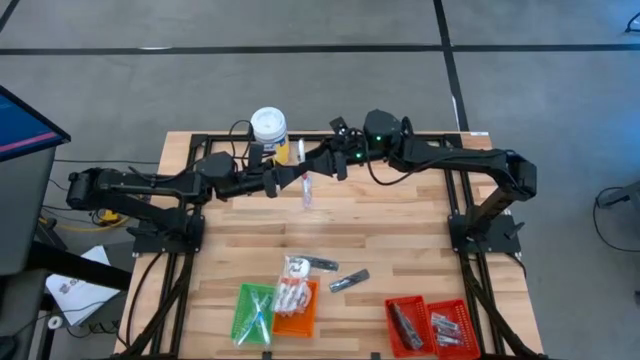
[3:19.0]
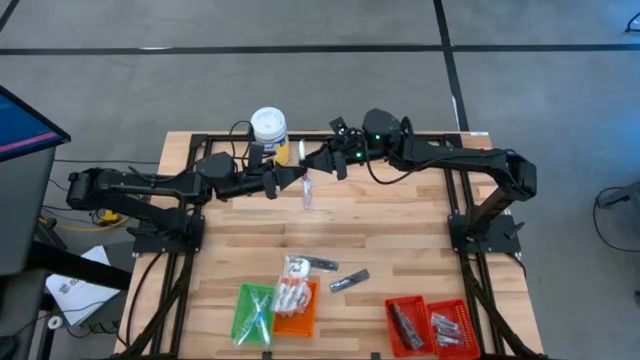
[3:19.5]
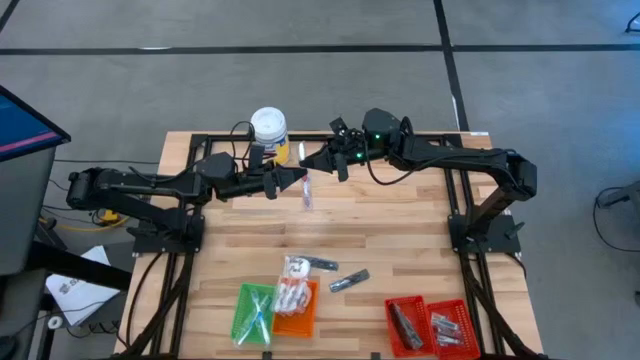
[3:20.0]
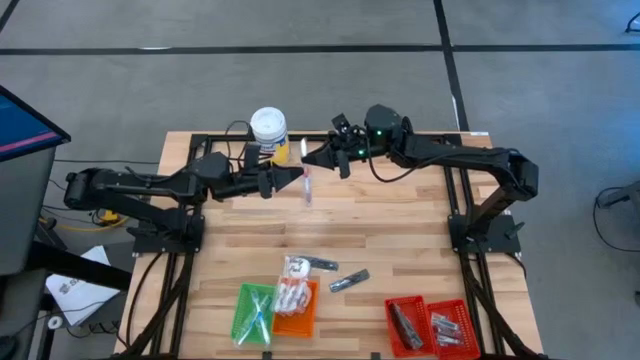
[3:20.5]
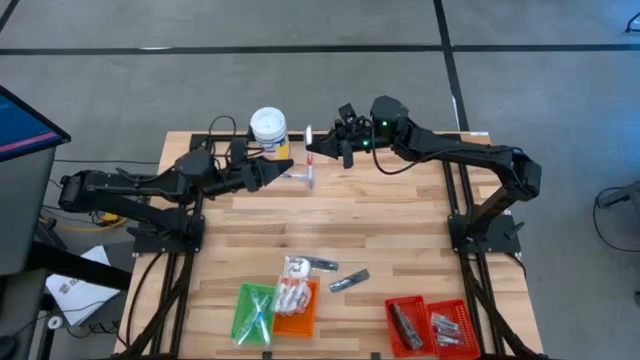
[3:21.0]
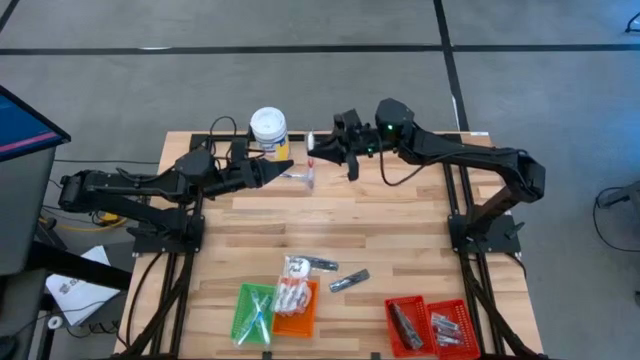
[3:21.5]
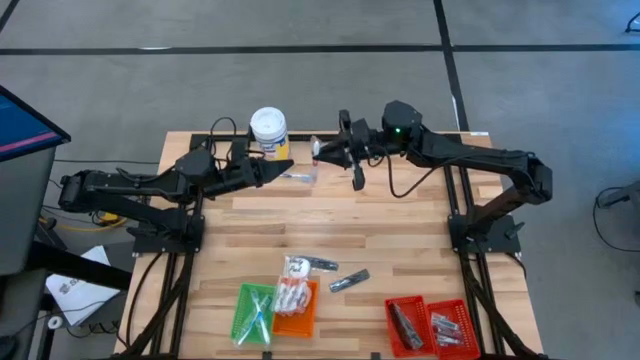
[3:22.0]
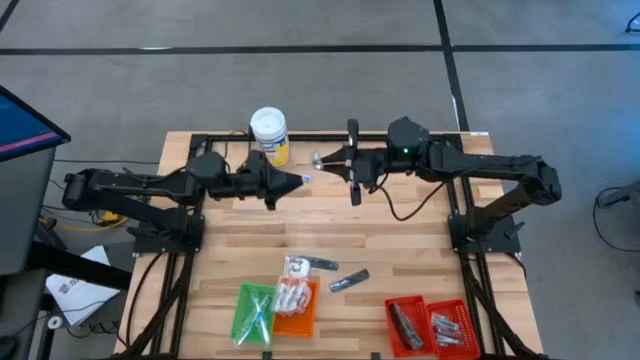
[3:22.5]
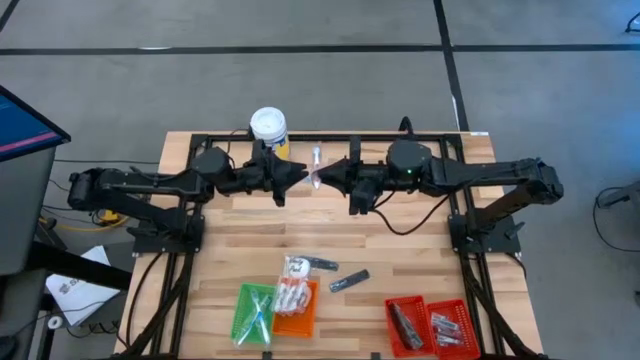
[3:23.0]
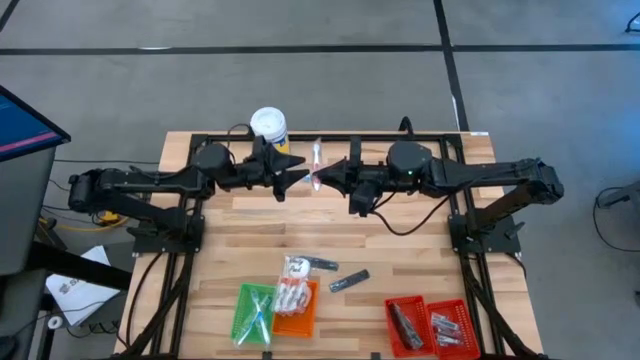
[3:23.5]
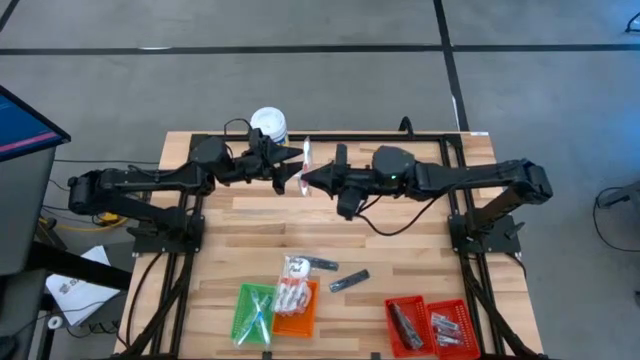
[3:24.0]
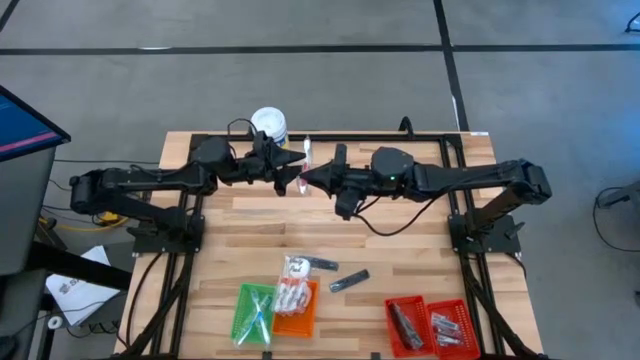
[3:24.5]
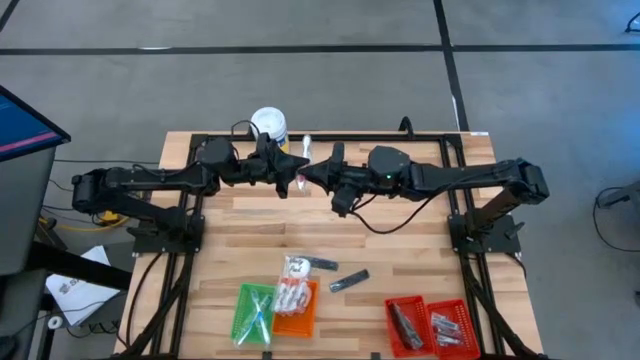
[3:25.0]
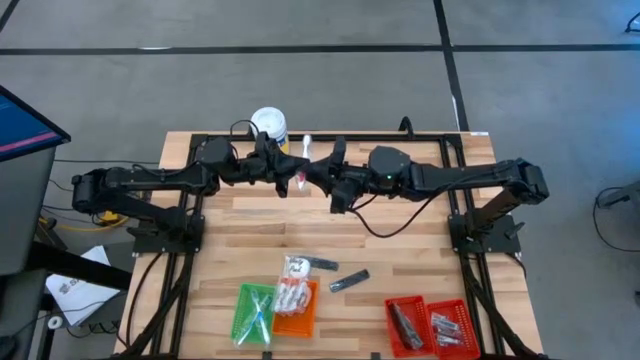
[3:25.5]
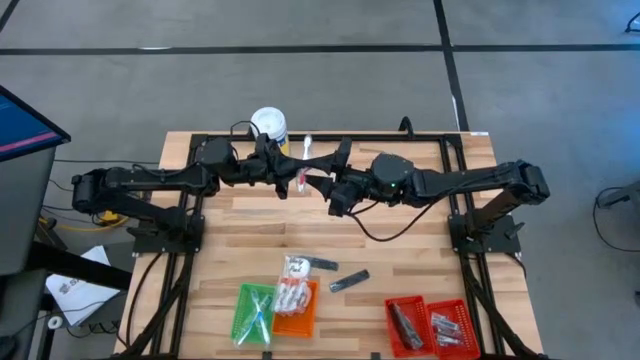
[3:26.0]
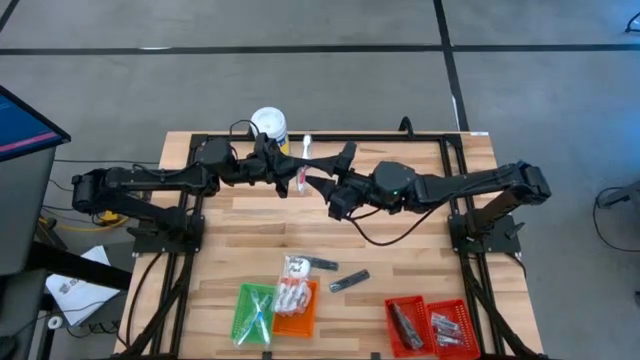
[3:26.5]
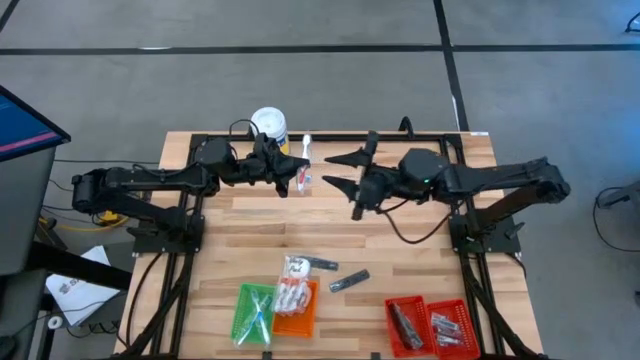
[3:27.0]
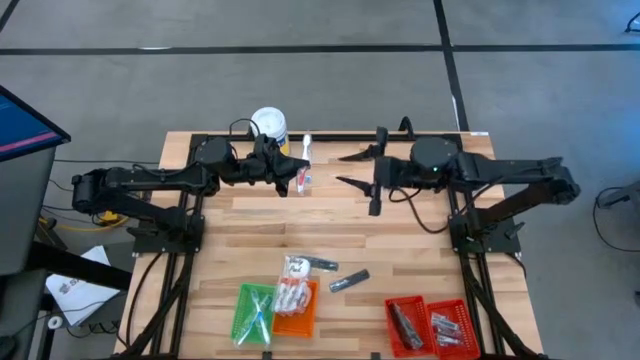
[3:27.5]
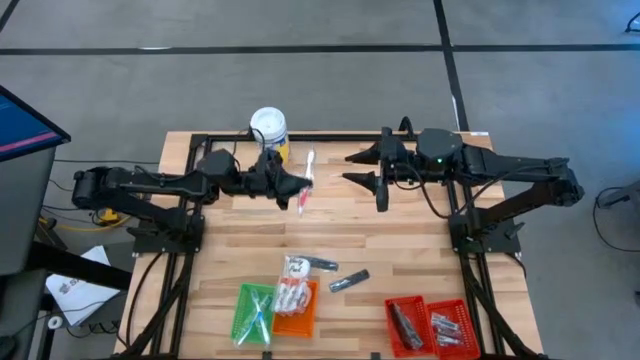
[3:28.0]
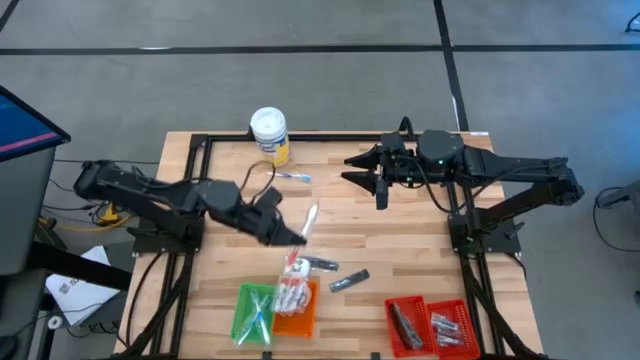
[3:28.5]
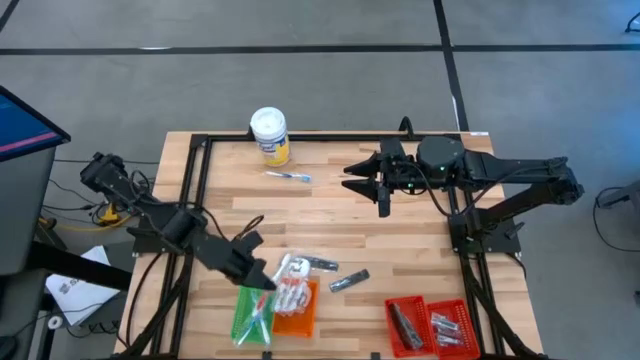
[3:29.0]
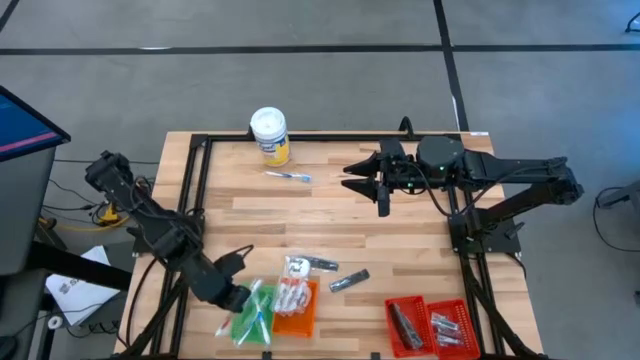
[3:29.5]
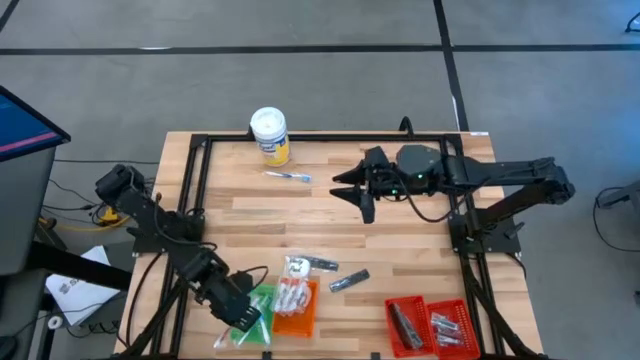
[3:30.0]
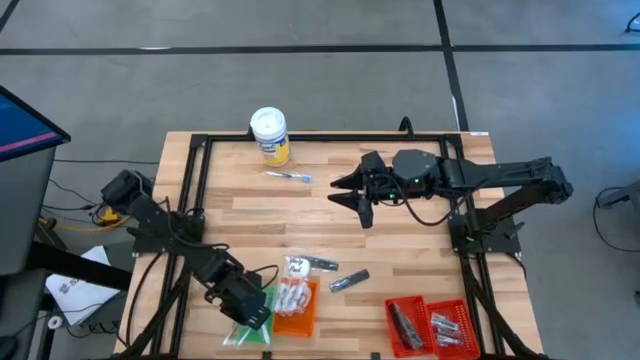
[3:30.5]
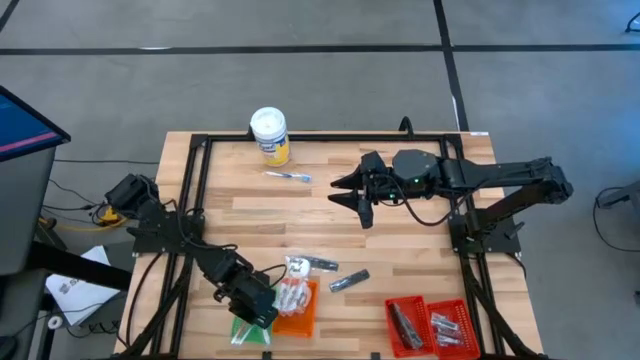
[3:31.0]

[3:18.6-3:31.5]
Task: Pick & Place Travel size toiletries
Put the orange toothbrush into the green basket

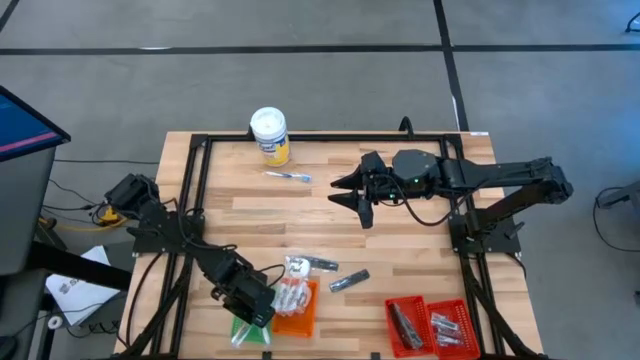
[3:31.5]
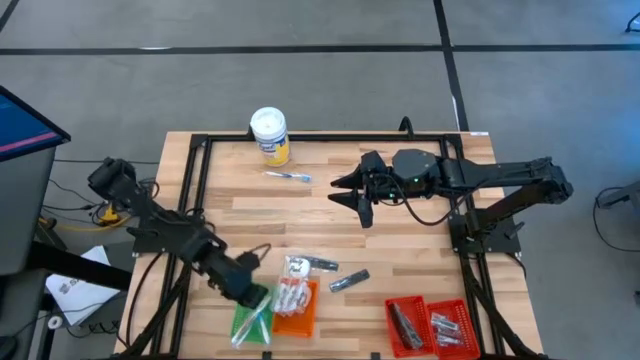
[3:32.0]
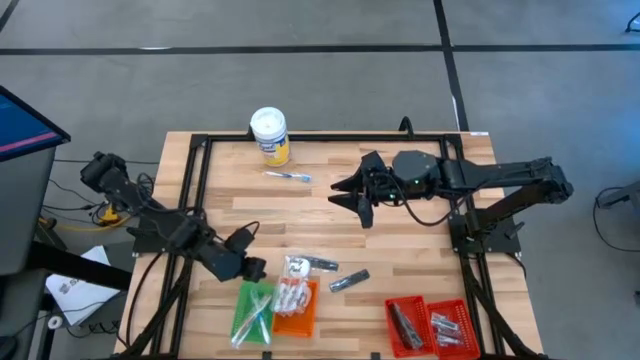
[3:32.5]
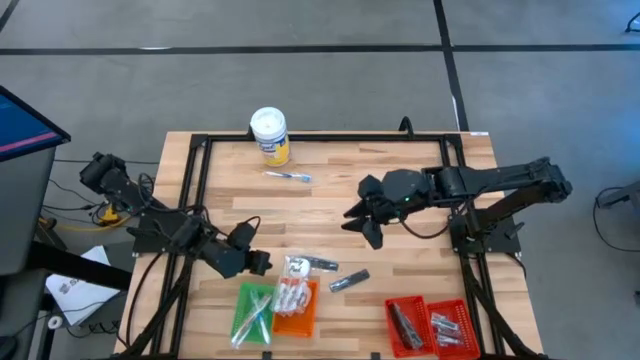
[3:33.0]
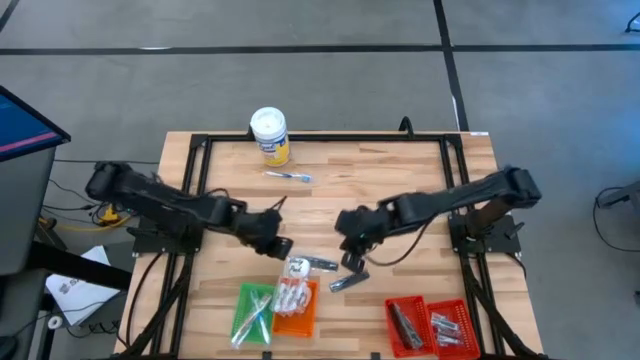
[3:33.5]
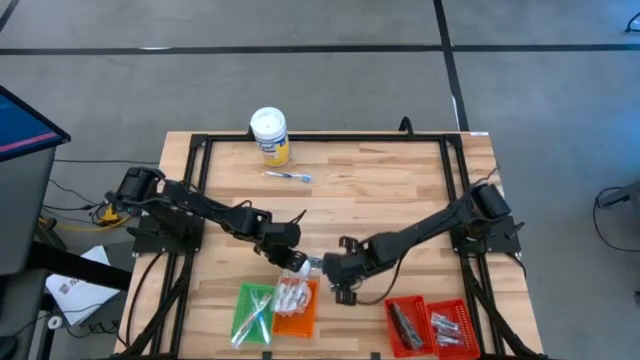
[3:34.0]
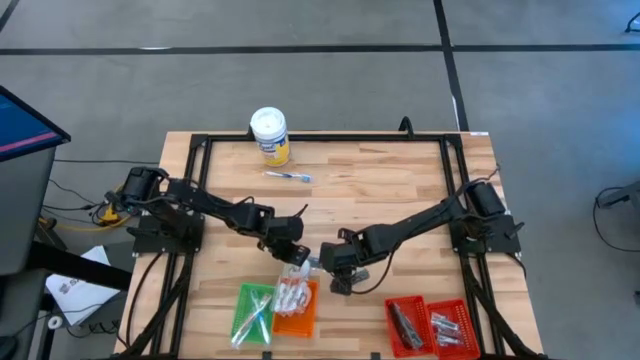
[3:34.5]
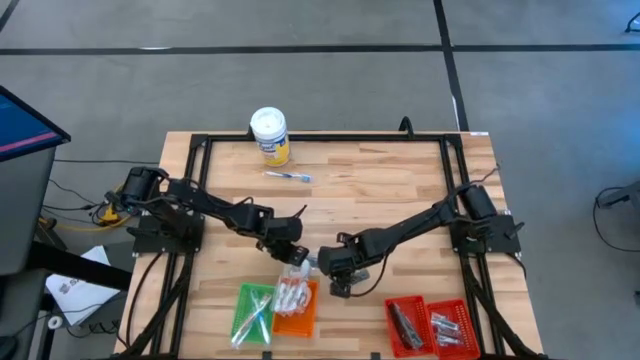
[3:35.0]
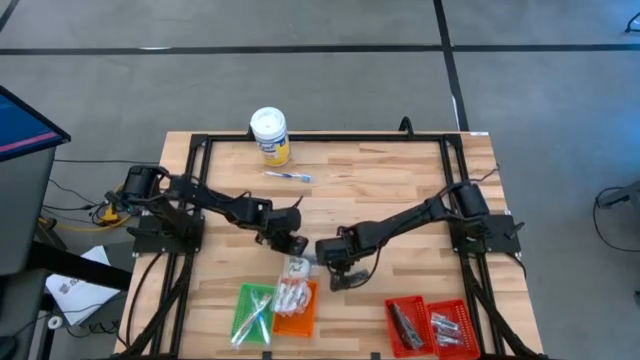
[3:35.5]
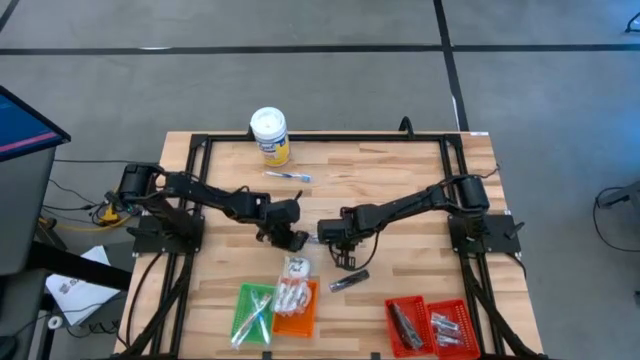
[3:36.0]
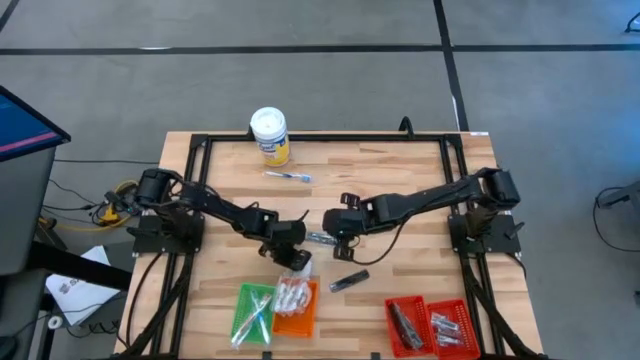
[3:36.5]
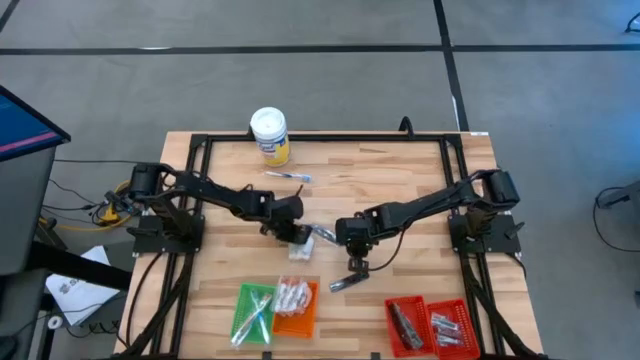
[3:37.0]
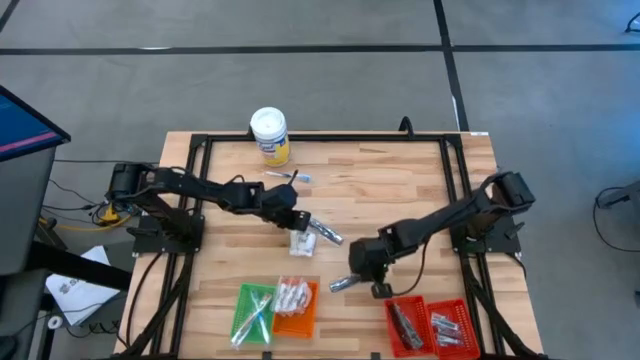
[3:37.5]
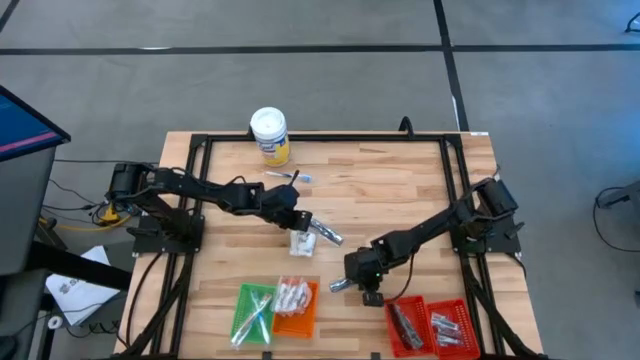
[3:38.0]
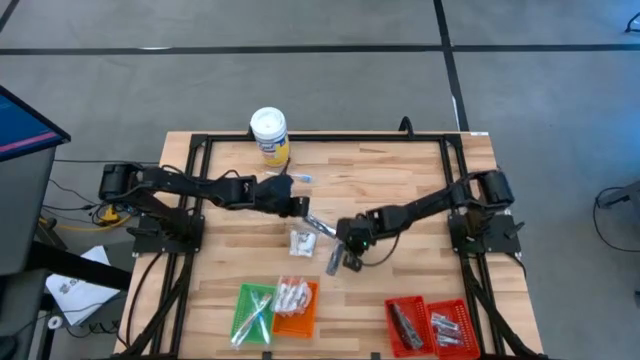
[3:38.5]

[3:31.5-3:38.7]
Move the white vanity pack and black combs to the middle of the table

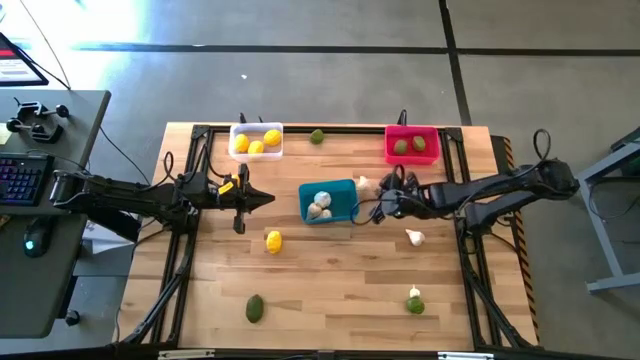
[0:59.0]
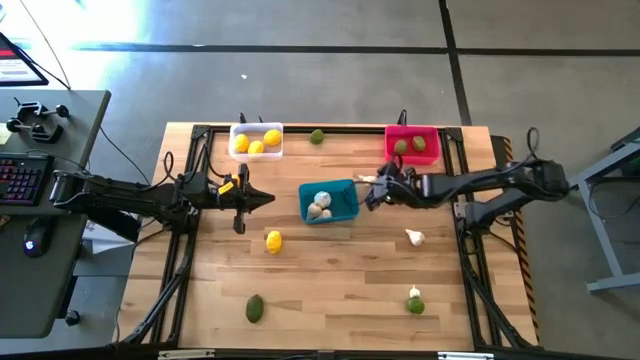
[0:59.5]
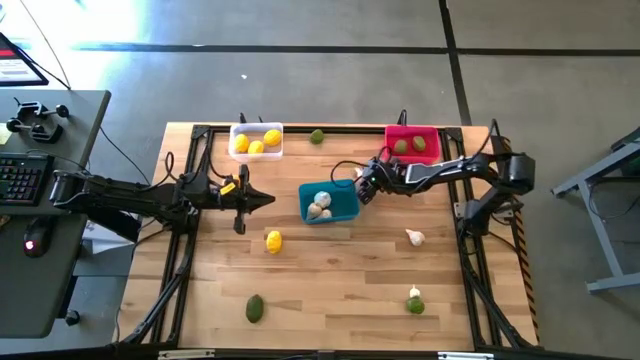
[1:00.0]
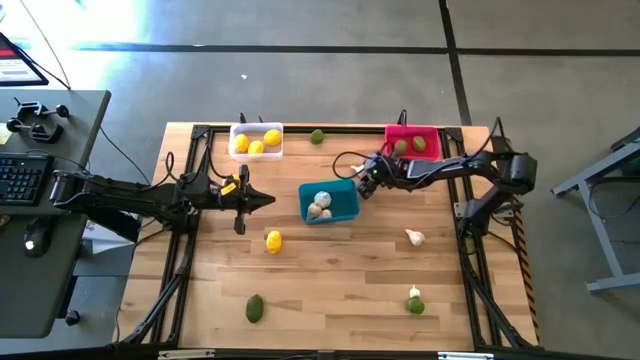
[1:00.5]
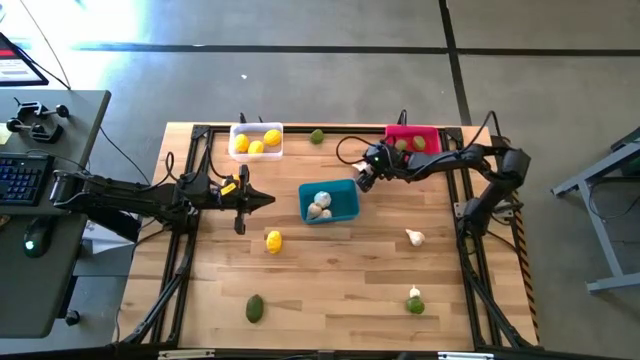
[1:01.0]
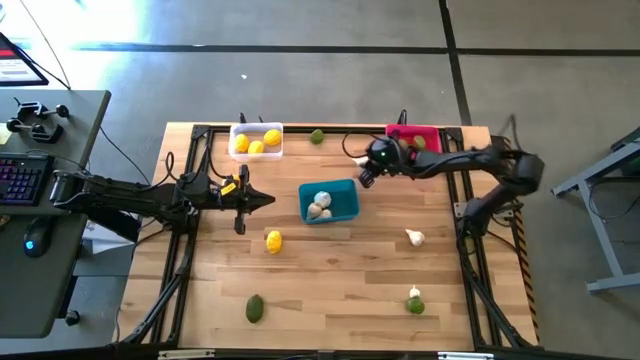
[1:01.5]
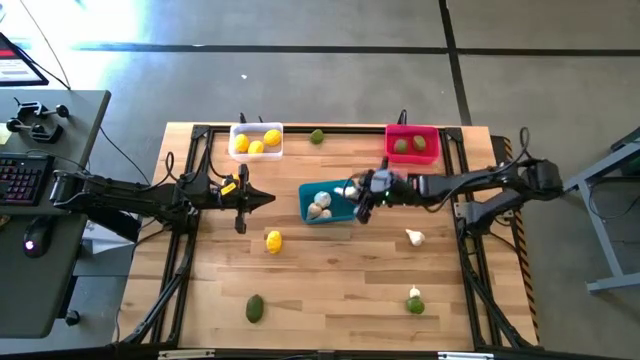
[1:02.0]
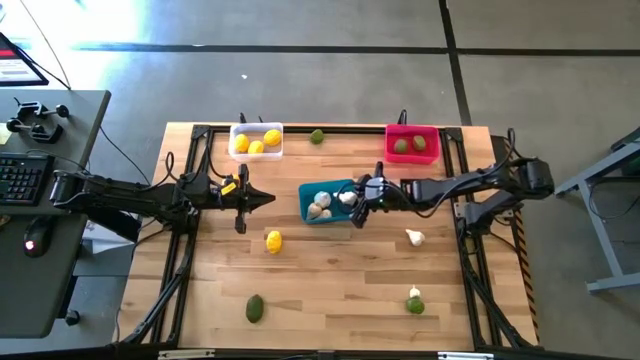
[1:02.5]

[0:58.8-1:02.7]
Task: Sort produce into baskets
Put the garlic into the blue bin
